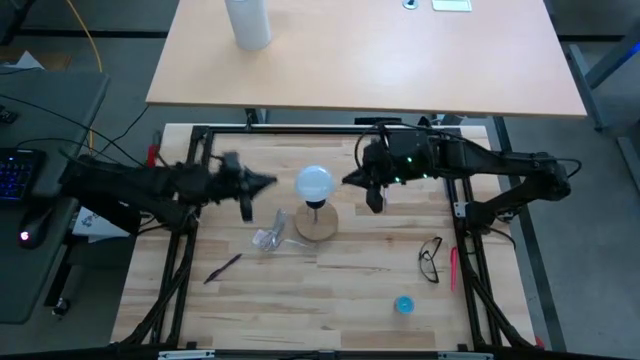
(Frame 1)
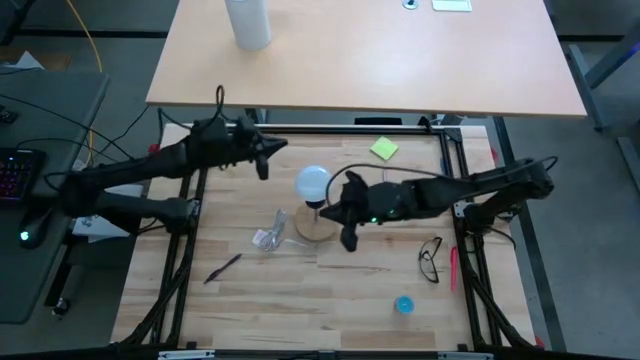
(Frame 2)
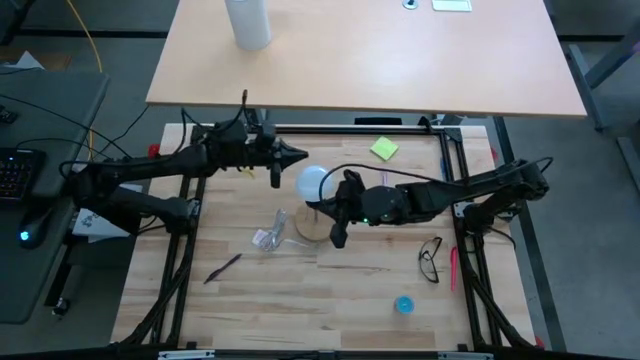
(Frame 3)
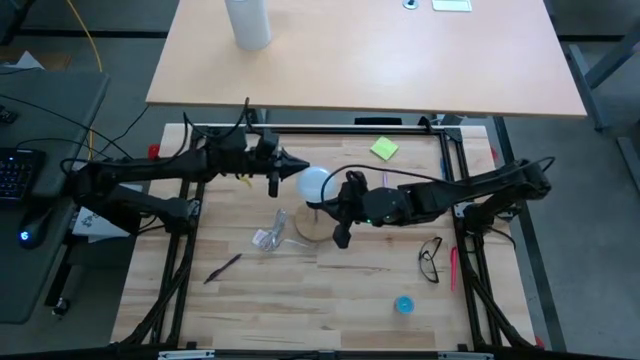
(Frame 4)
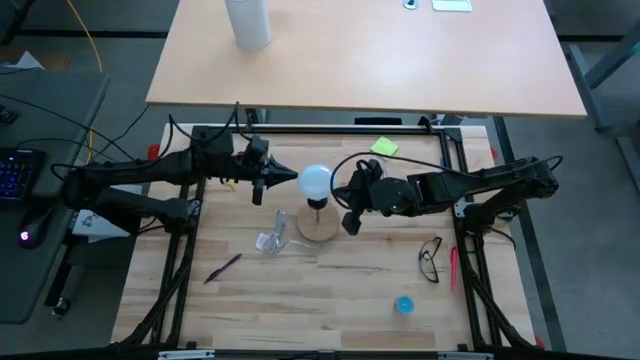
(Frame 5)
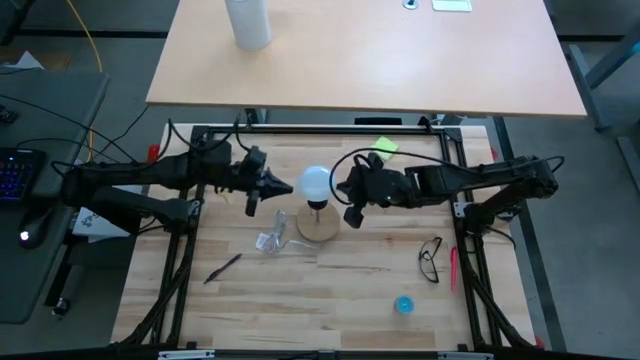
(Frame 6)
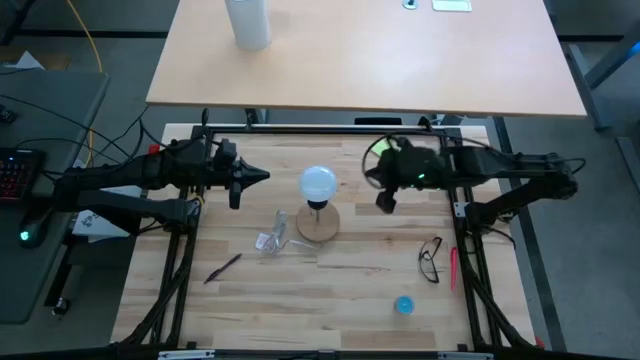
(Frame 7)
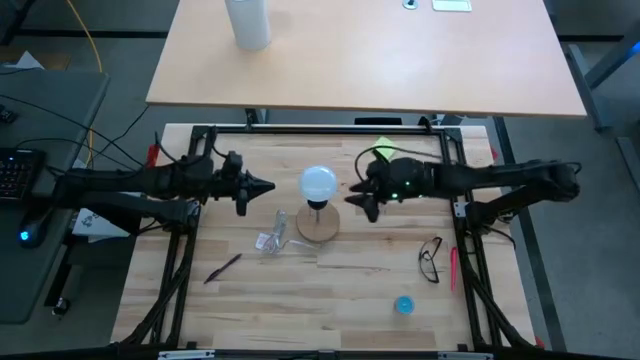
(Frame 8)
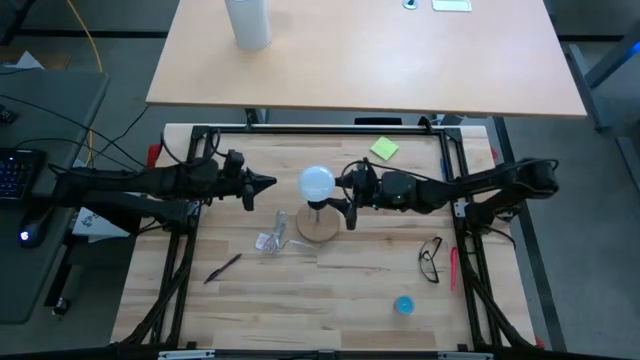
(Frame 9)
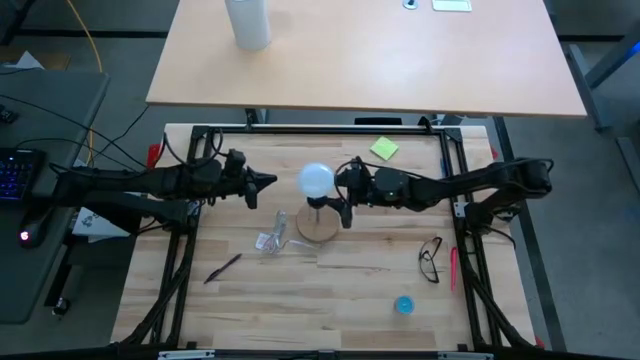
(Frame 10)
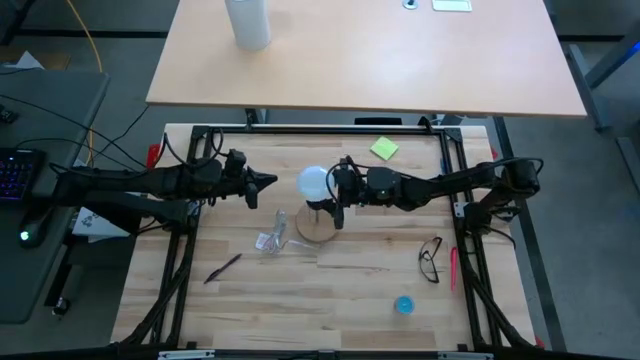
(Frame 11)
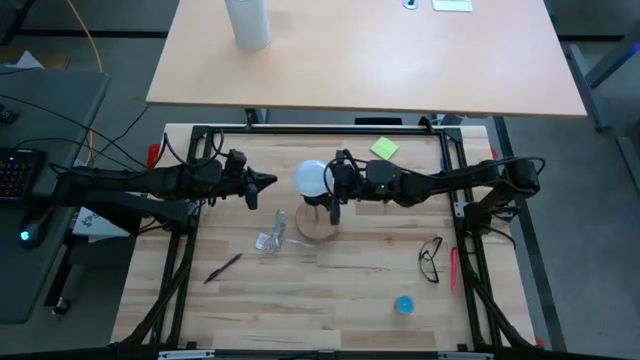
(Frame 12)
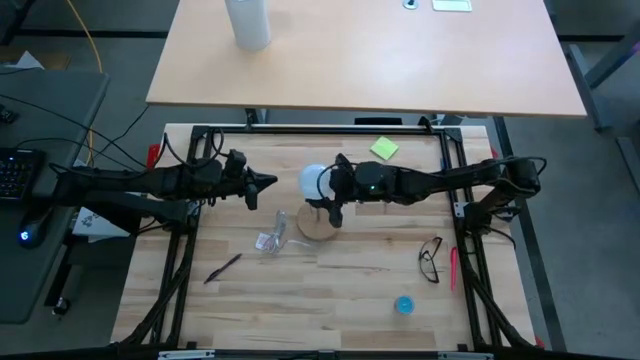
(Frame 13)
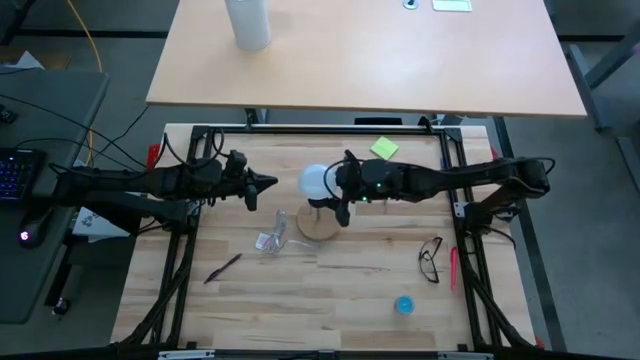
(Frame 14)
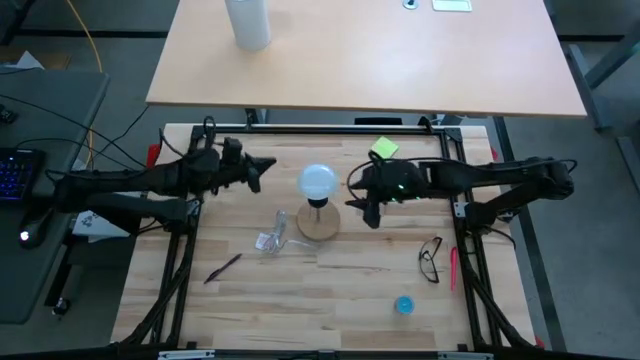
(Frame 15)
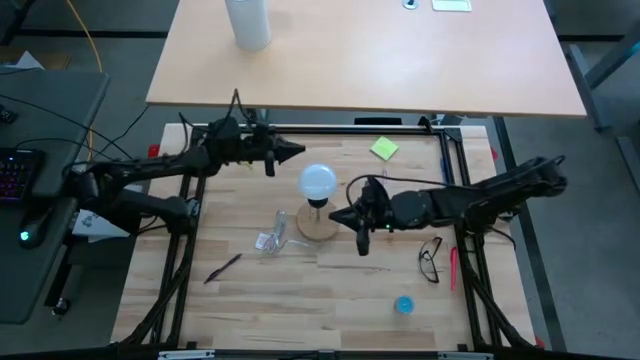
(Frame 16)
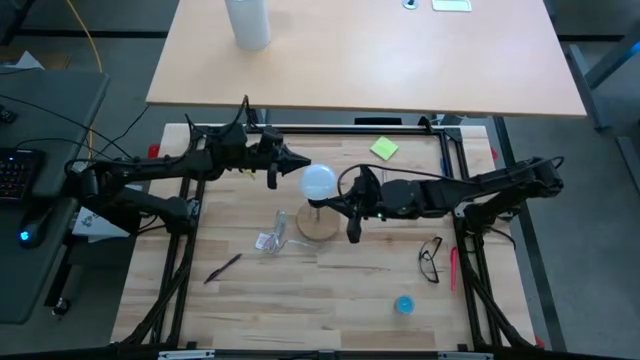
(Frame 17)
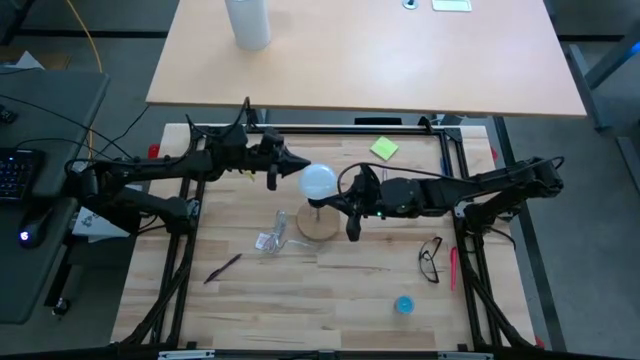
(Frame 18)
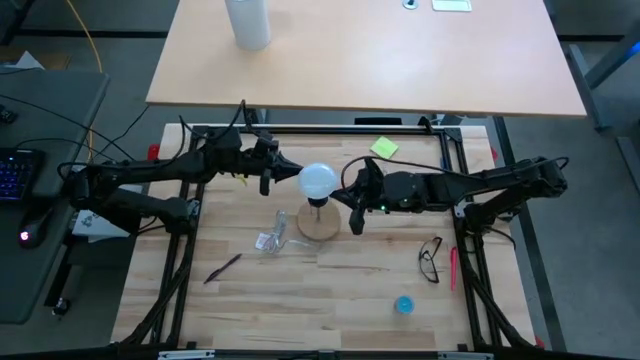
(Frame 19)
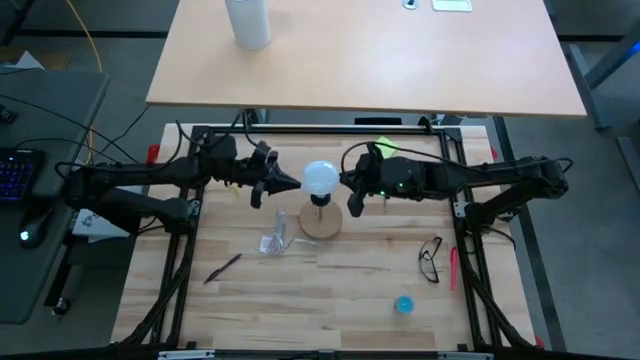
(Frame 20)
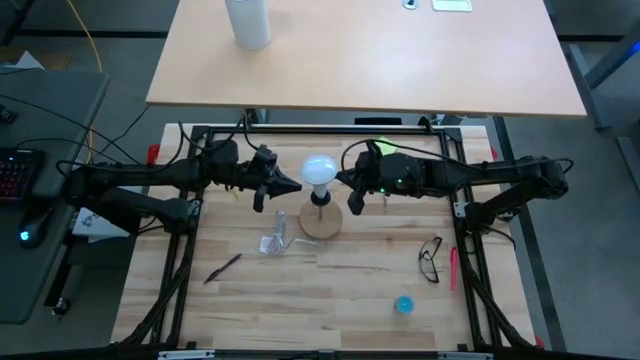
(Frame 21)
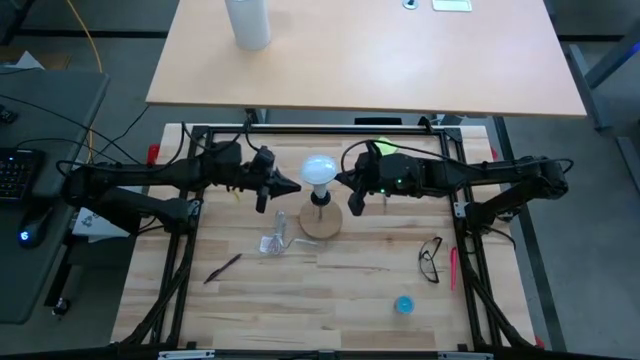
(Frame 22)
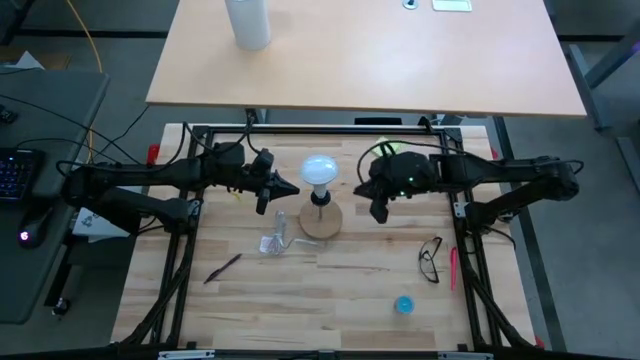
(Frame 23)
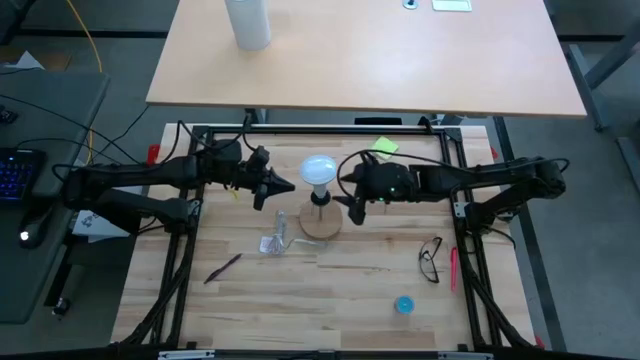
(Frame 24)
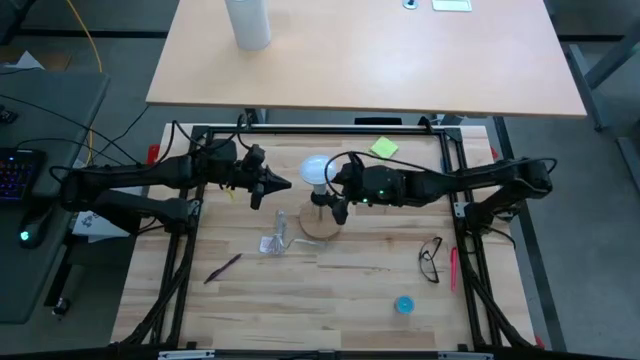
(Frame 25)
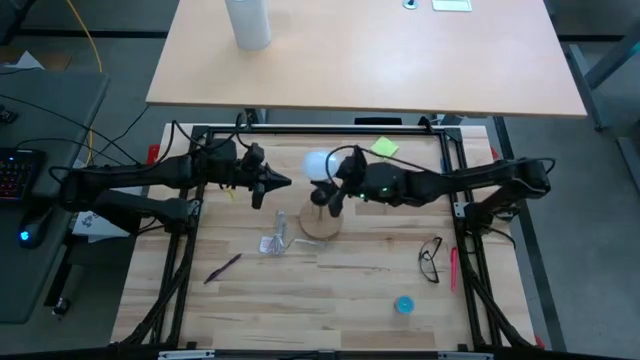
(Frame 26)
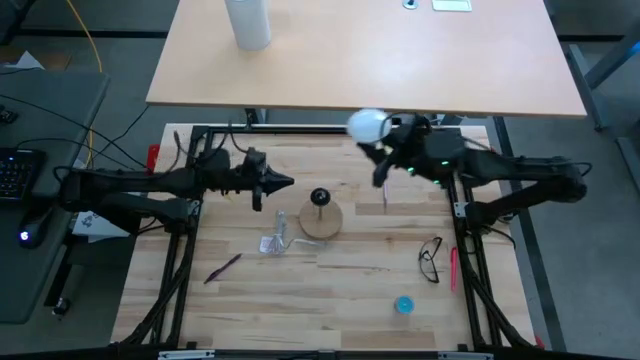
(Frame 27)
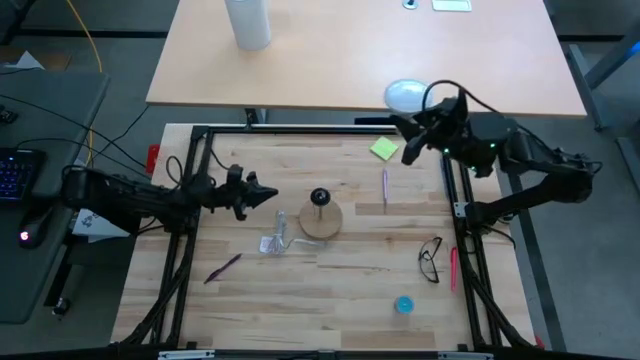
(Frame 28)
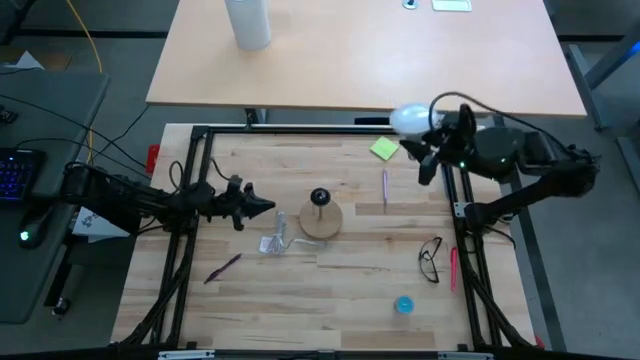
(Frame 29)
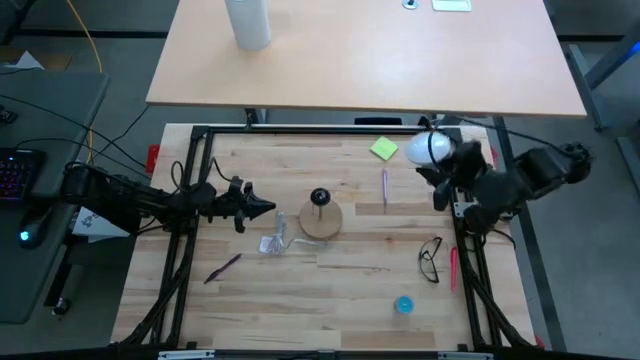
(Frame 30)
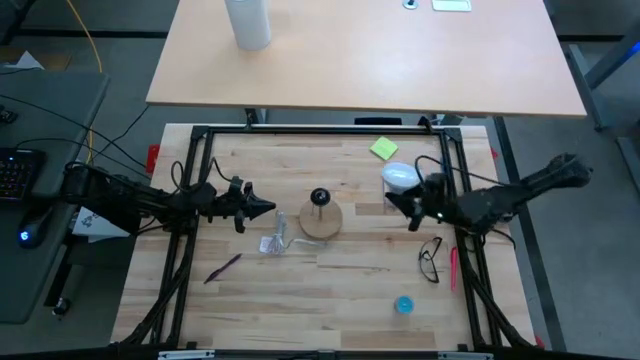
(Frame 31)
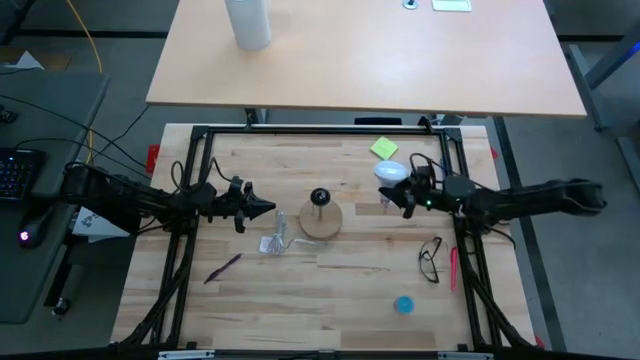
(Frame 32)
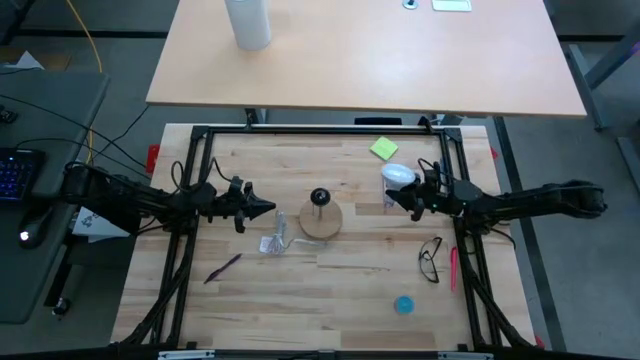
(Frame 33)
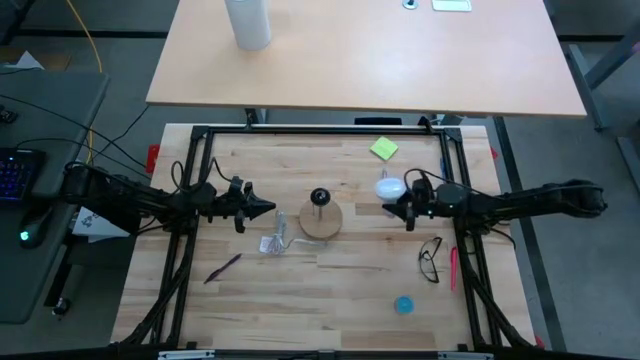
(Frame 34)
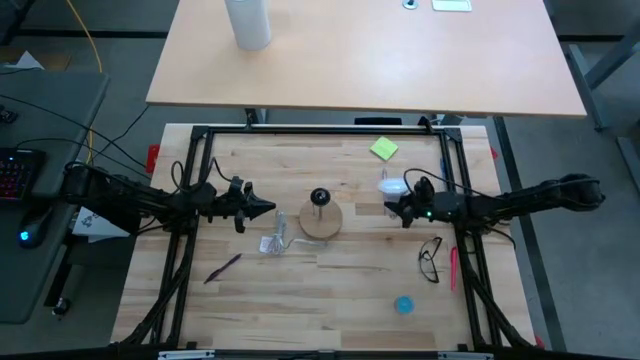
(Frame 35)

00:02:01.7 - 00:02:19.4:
Task: Screw lightbulb
Remove the lightbulb from the lamp

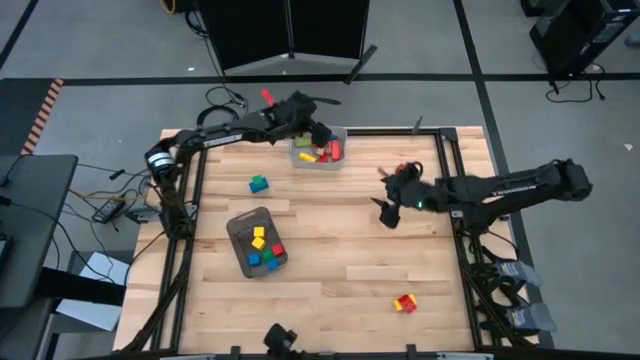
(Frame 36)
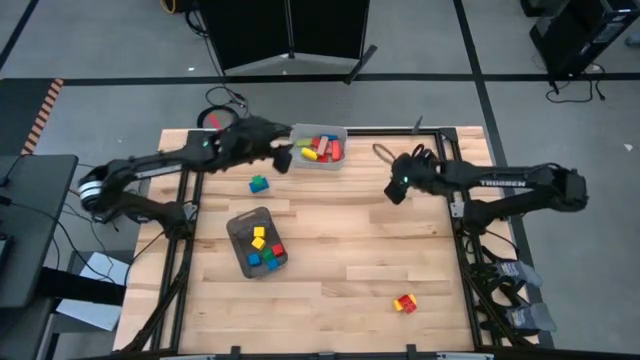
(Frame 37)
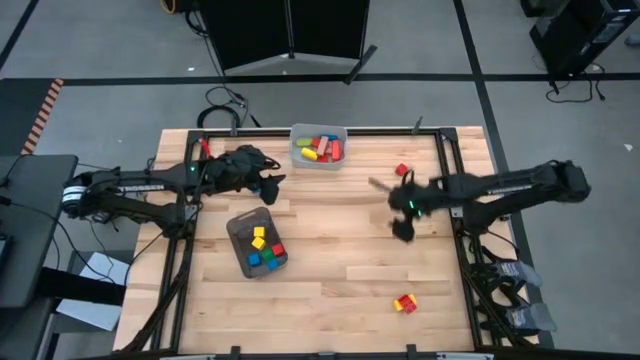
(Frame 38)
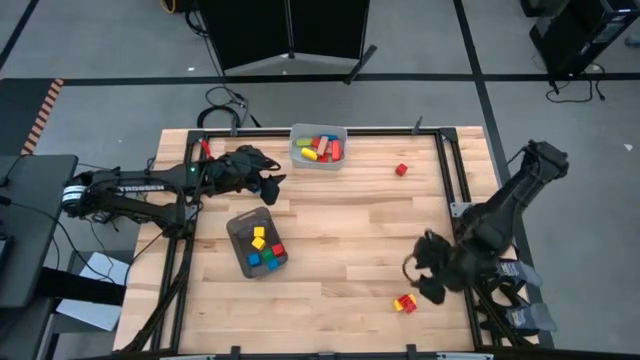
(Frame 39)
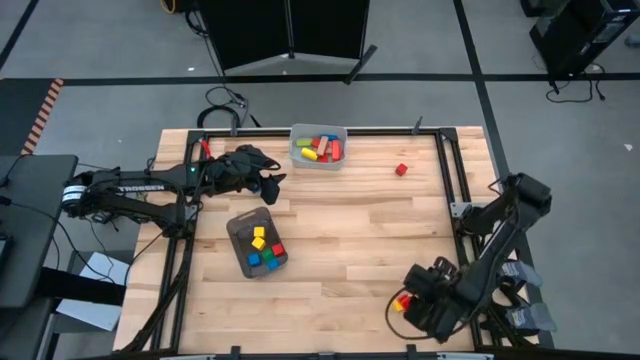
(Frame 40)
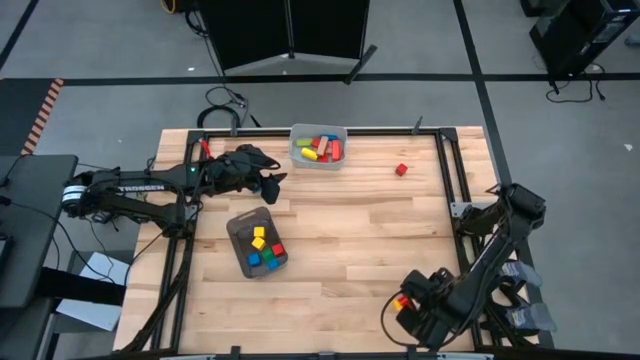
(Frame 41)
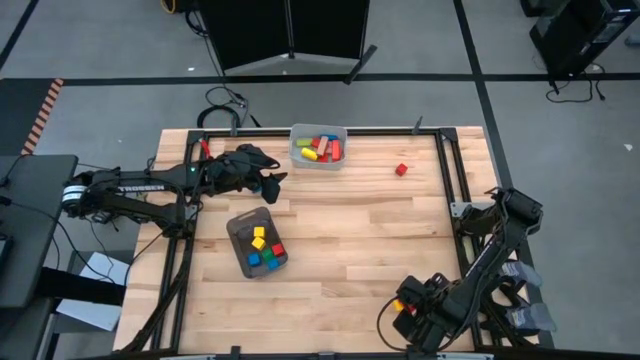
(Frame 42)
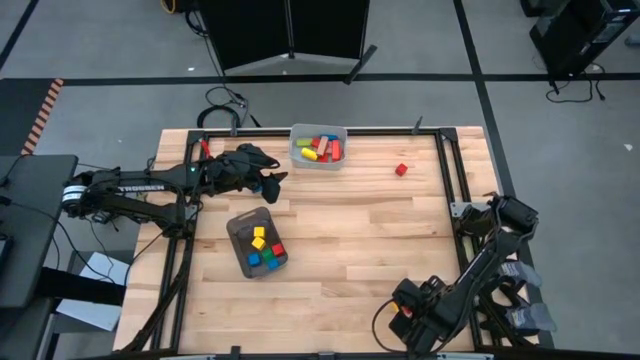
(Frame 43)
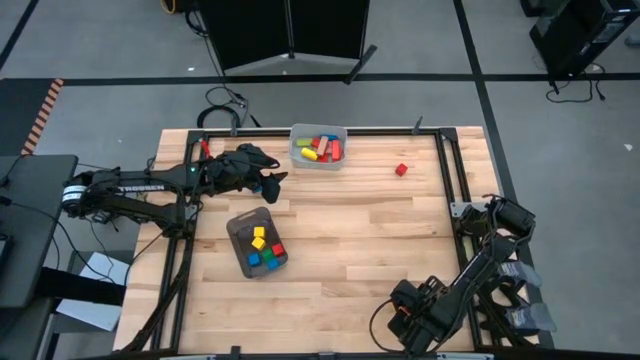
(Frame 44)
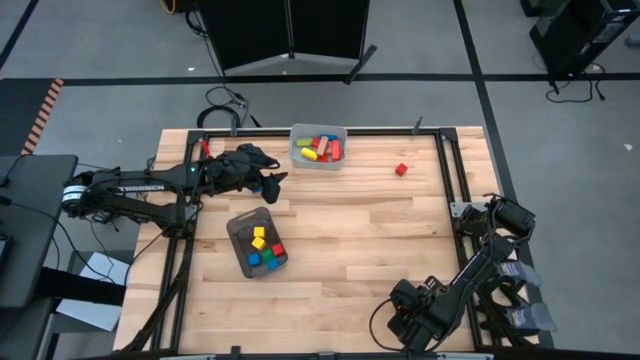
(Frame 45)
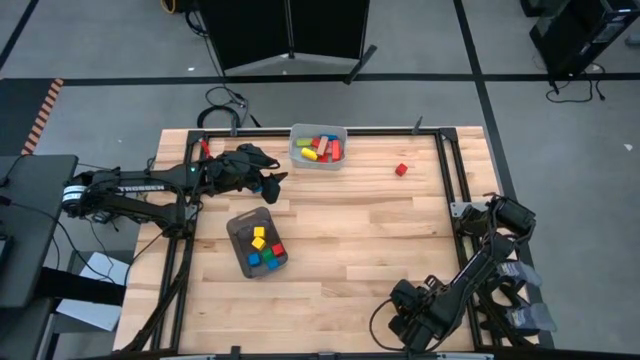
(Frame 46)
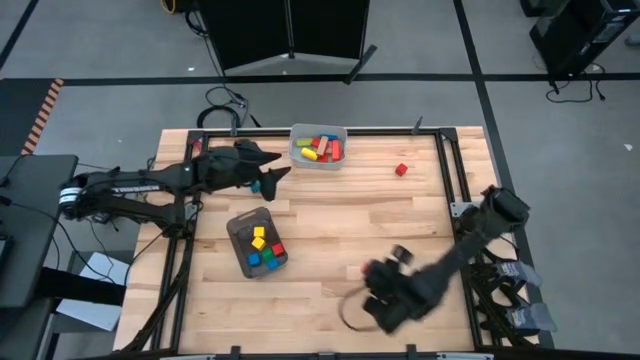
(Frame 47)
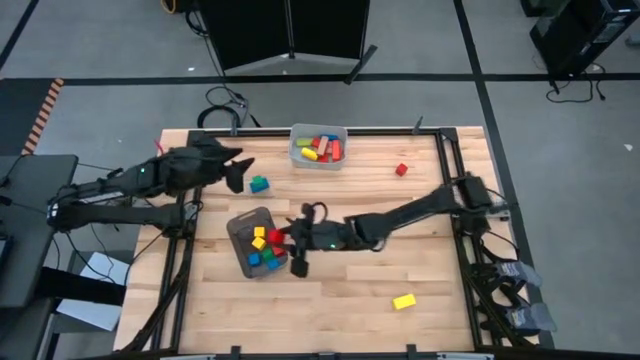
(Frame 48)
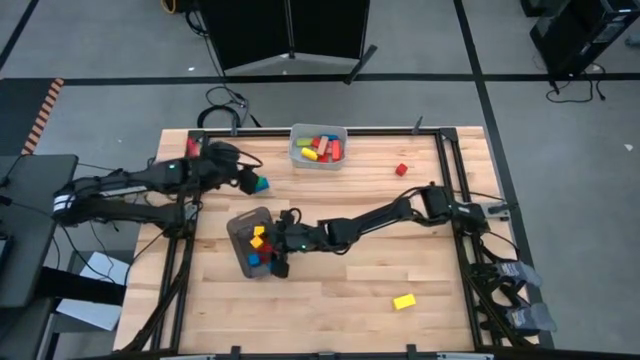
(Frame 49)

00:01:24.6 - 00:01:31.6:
Task: Sort blocks by size
Put the red game piece into the black bin
